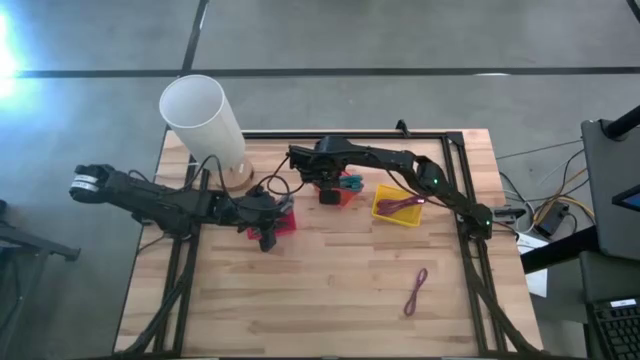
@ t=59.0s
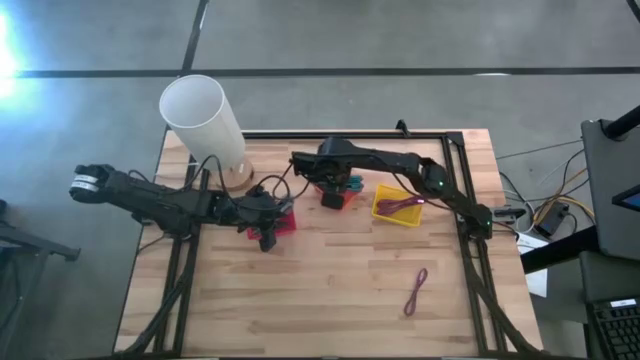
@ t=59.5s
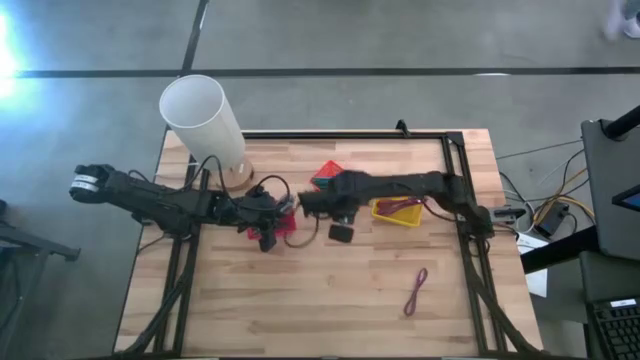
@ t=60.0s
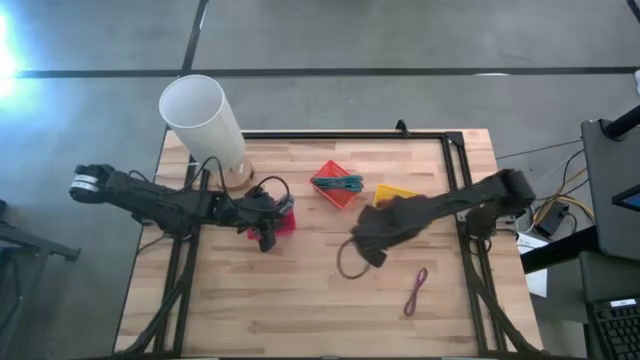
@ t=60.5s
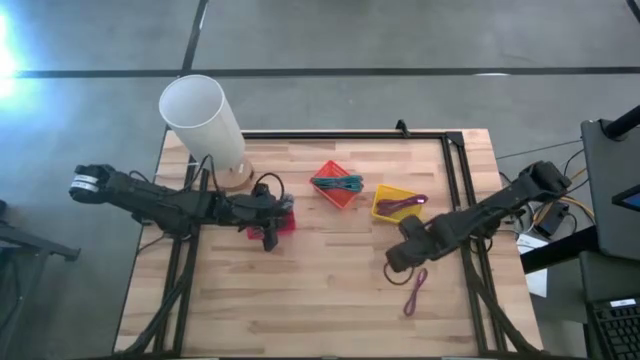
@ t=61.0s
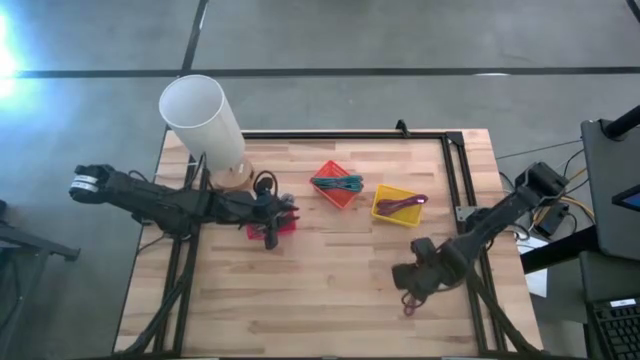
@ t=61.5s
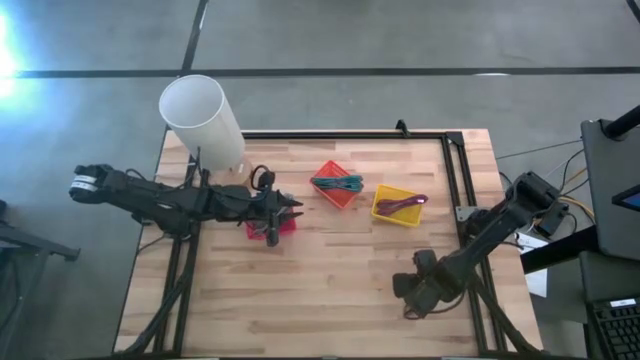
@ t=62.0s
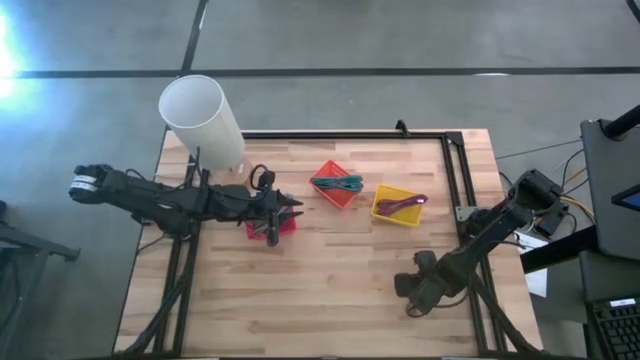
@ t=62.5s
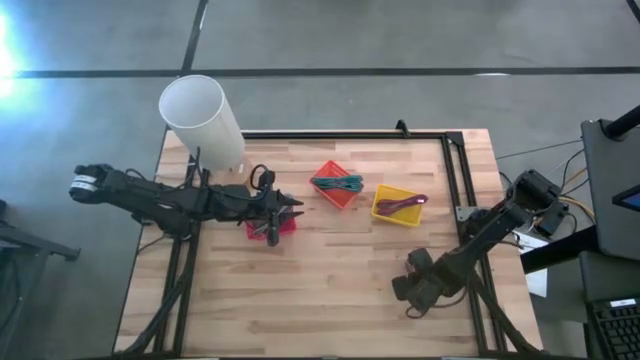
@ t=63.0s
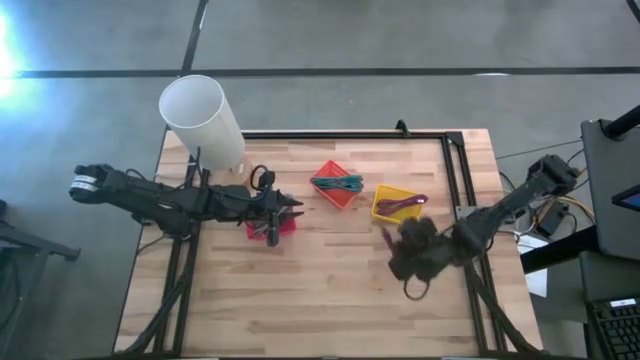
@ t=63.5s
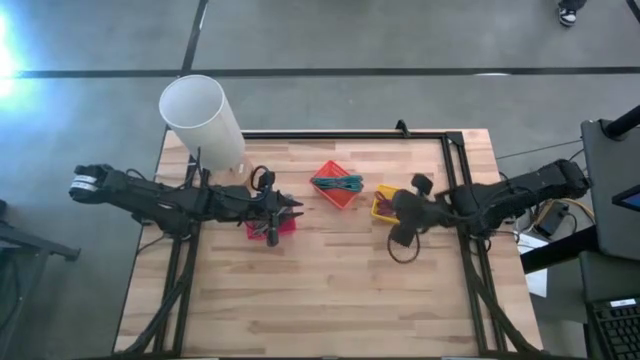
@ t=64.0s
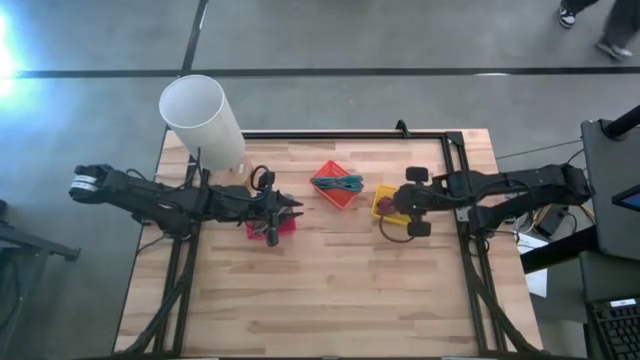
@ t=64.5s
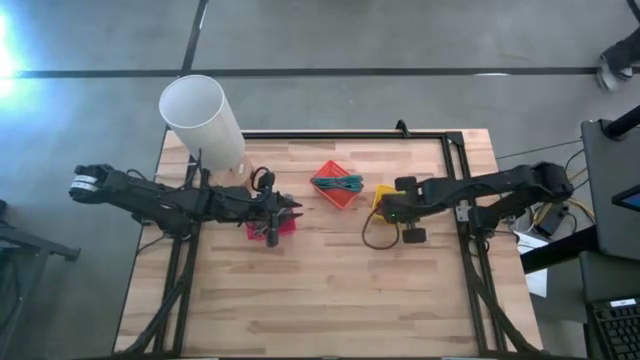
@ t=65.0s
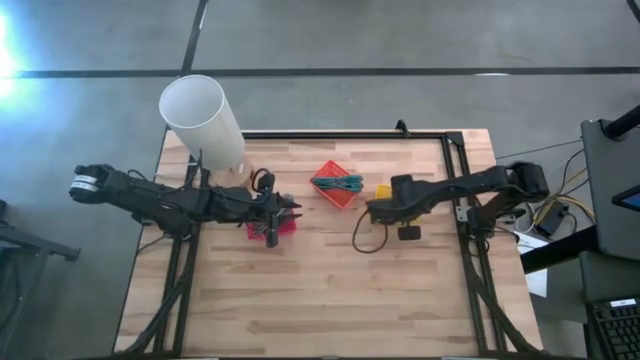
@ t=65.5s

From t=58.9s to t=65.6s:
Task: Pick & Place USB Port
Put the black and pink charger cable into the yellow bin

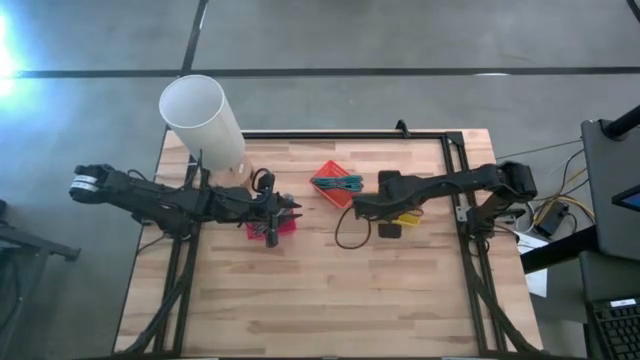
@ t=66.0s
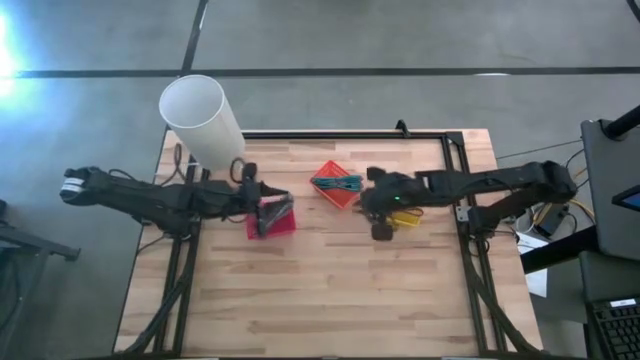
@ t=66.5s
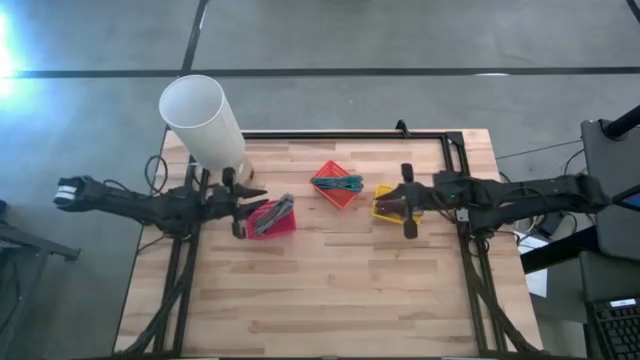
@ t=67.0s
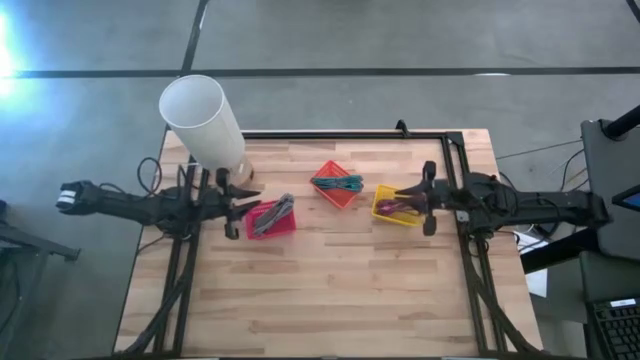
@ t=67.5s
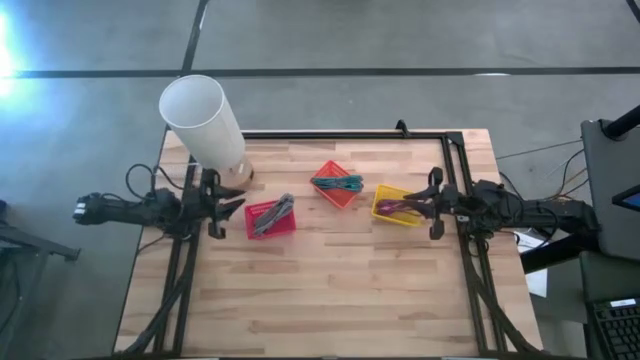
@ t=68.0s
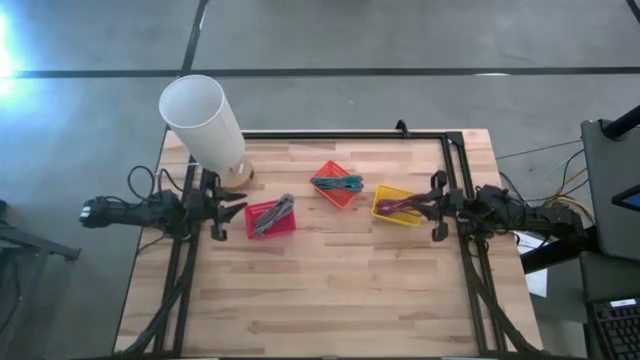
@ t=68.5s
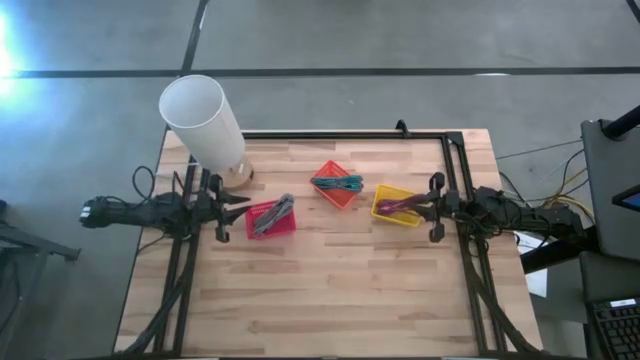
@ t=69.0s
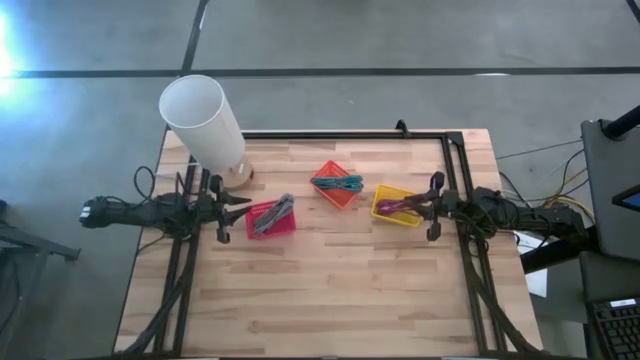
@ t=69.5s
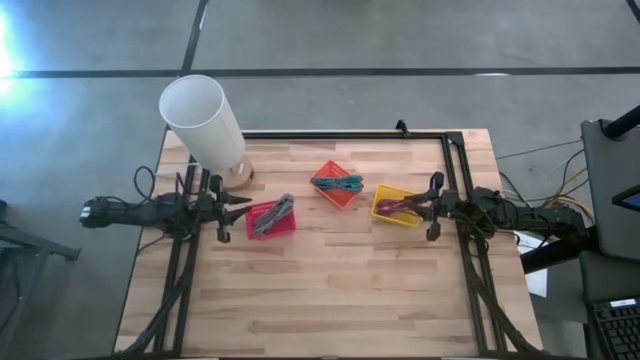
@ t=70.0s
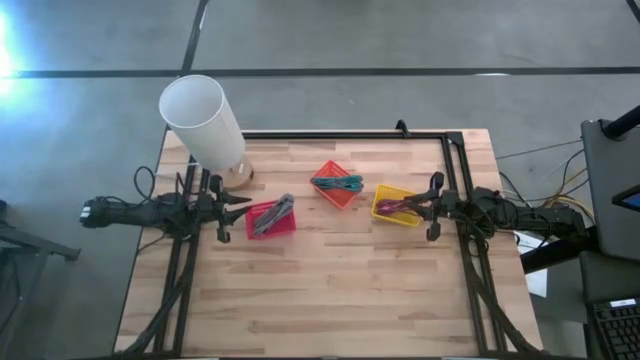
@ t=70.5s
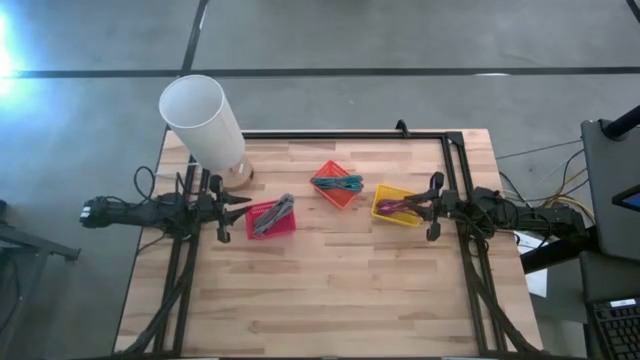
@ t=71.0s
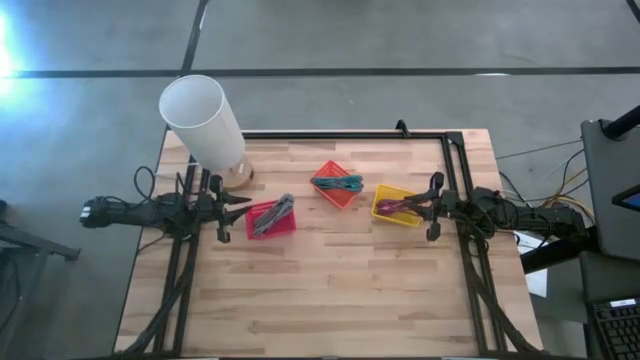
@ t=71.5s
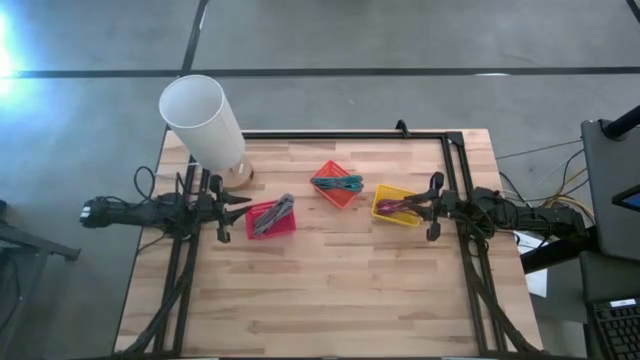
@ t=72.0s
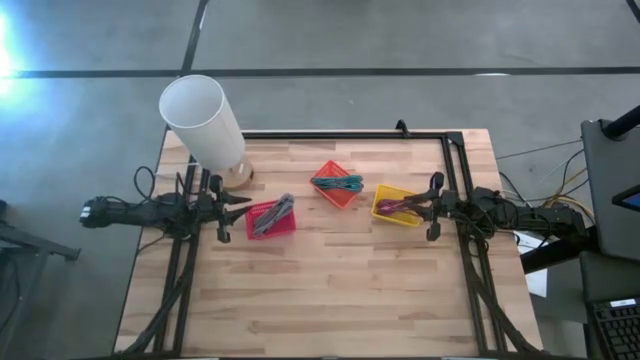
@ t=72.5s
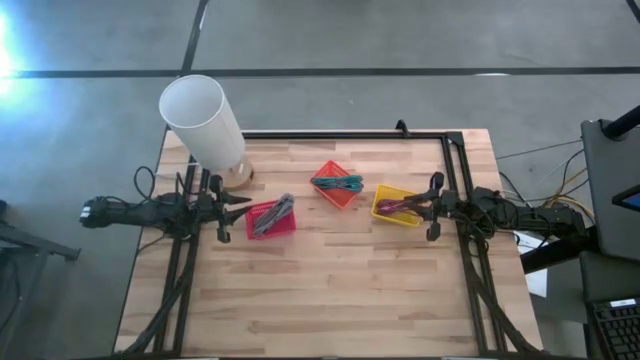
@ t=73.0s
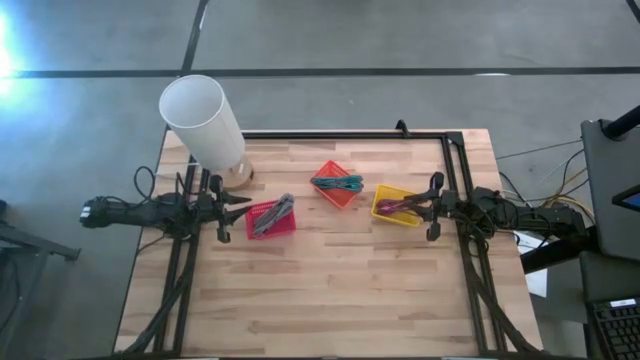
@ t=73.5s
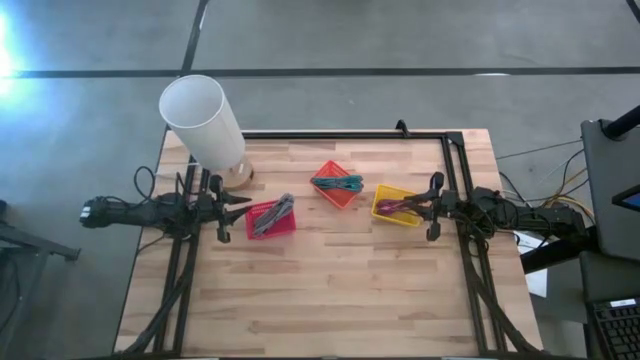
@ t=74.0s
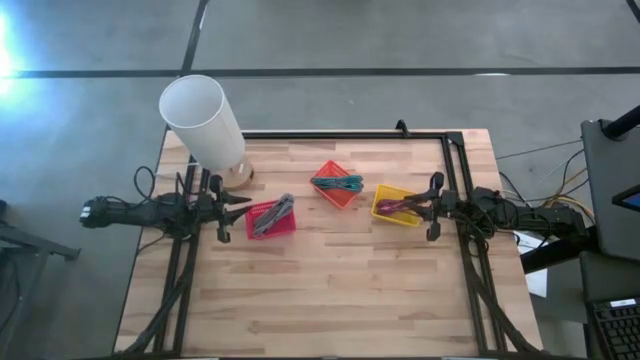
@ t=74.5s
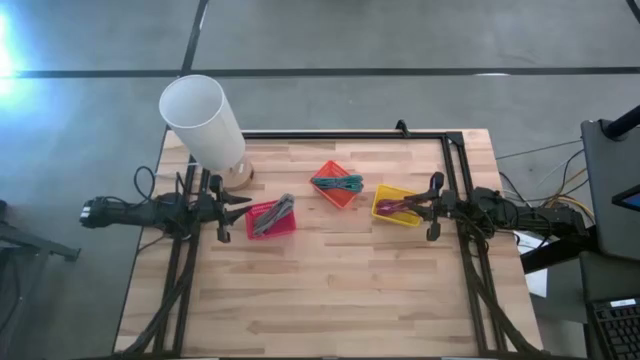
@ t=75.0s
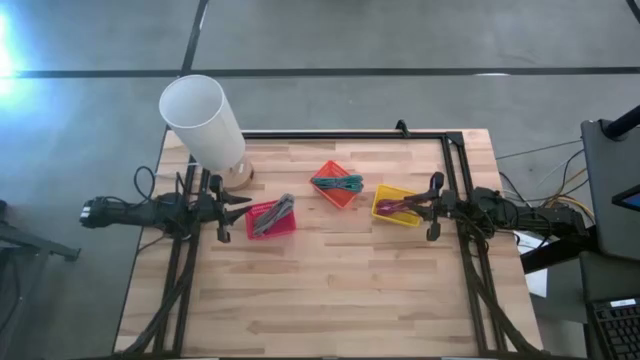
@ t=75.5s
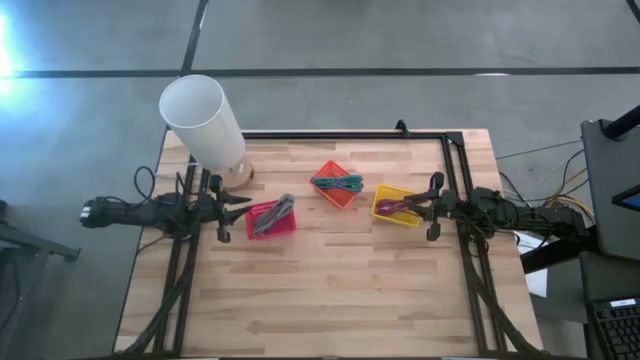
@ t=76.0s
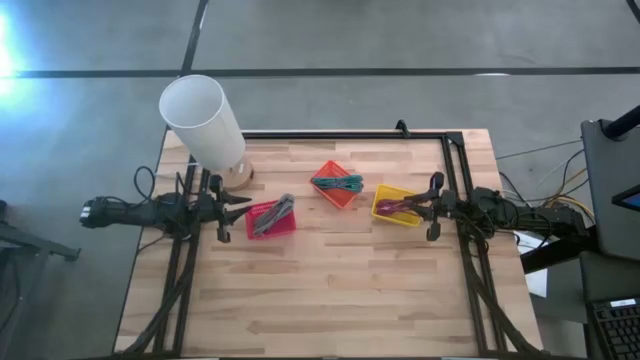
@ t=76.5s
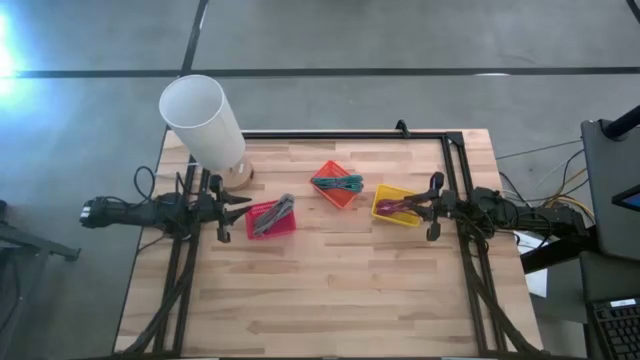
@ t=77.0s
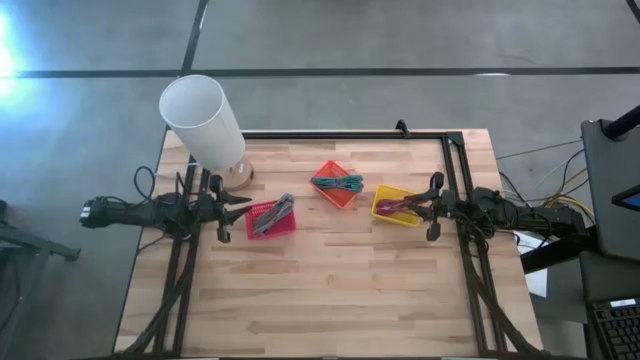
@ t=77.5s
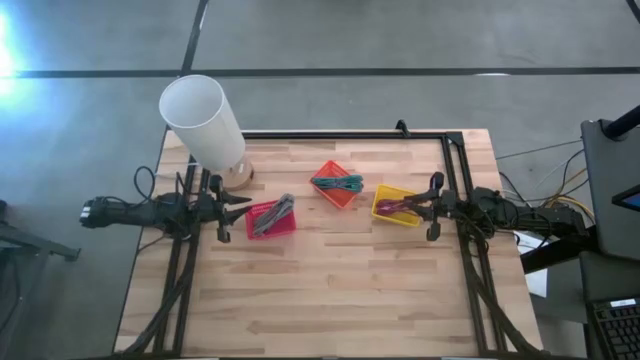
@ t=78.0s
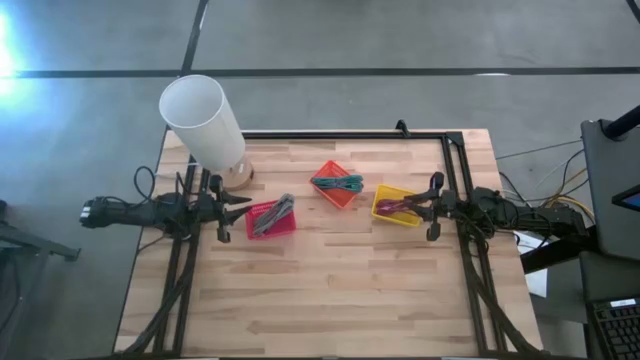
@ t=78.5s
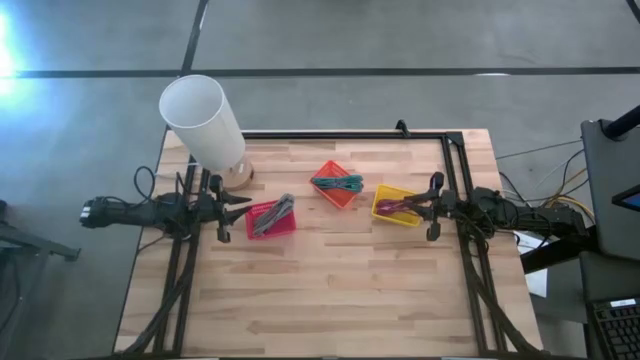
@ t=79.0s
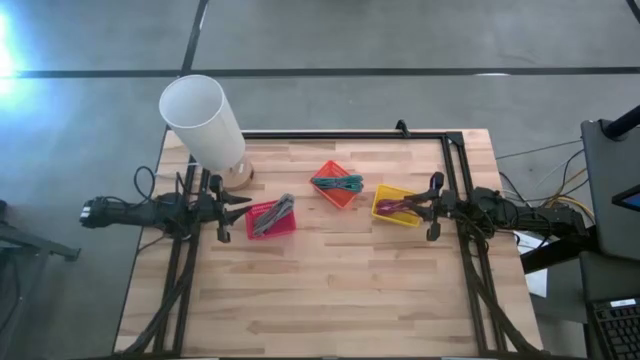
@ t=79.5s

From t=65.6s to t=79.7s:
Return to Home Position
